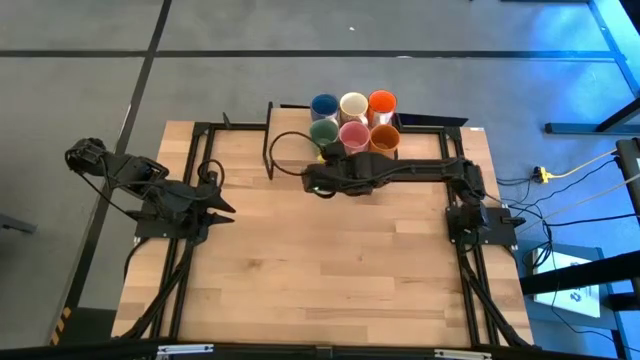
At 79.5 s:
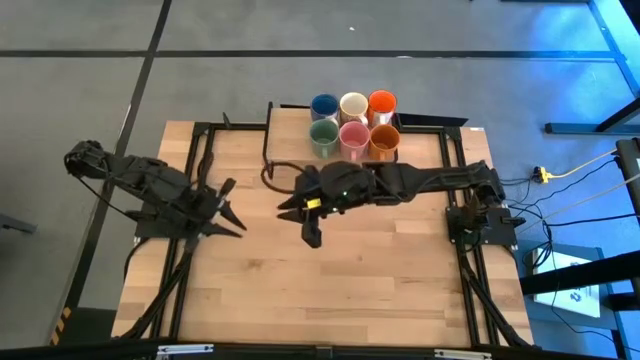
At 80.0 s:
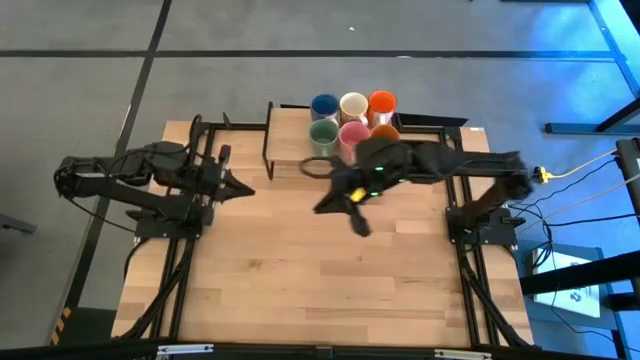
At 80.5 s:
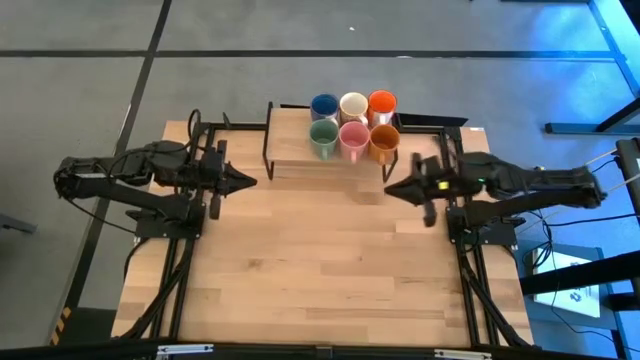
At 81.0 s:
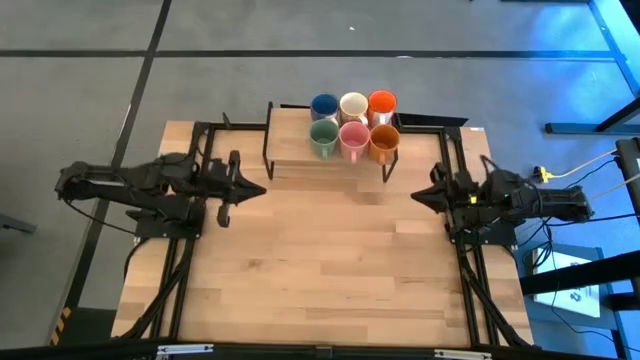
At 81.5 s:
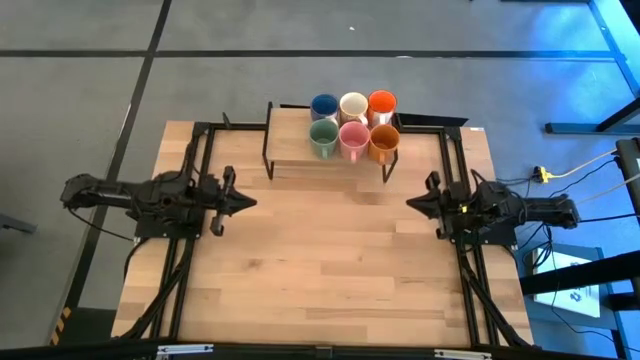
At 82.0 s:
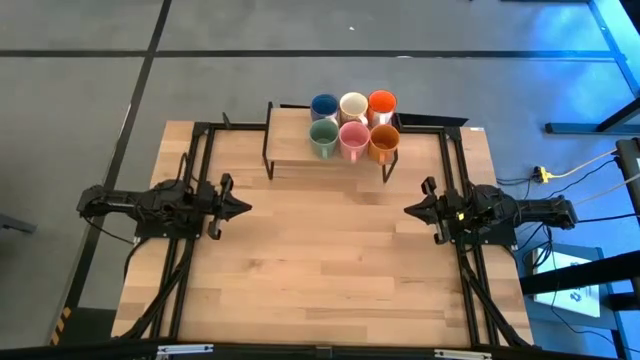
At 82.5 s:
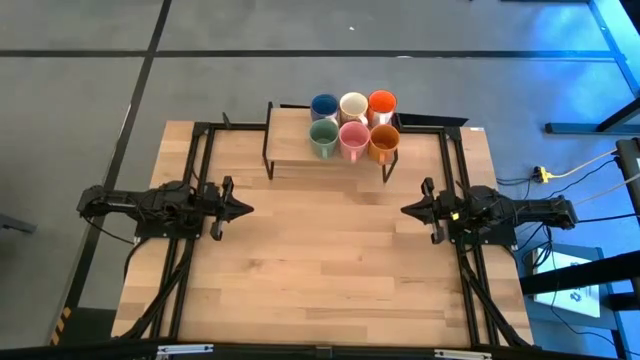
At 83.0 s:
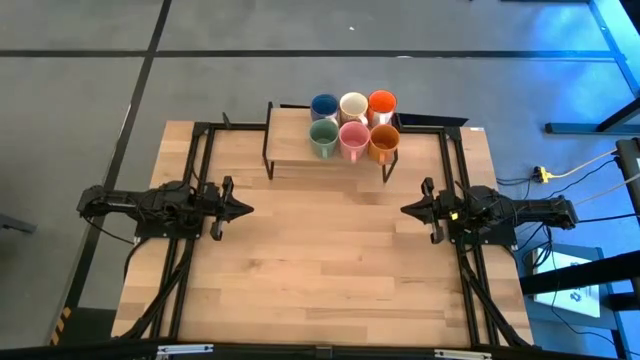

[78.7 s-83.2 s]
Task: Place coffee mugs
Return to Home Position

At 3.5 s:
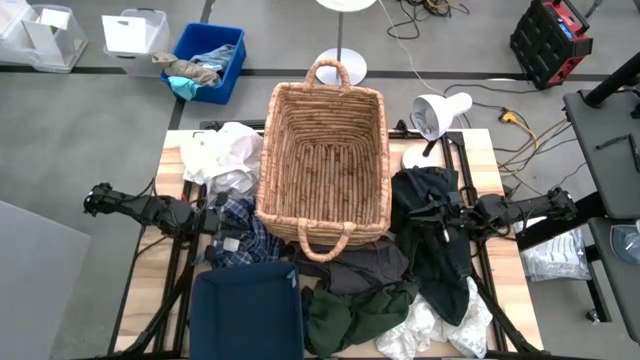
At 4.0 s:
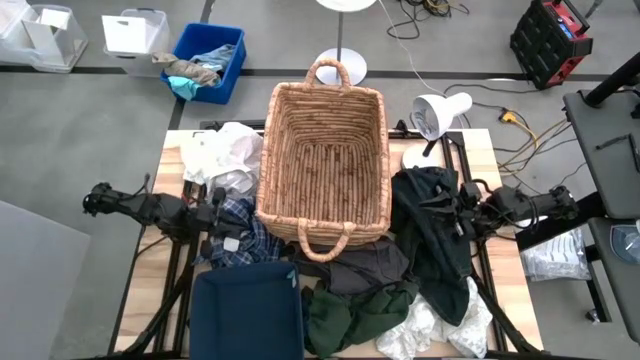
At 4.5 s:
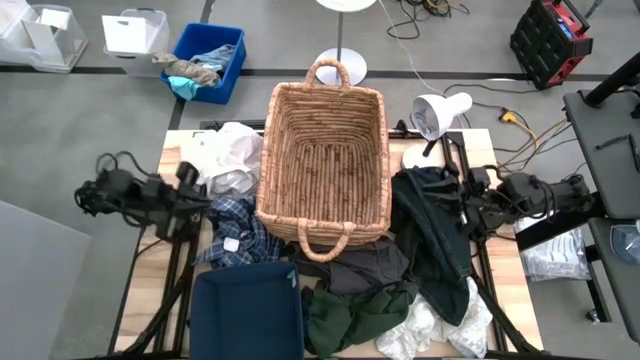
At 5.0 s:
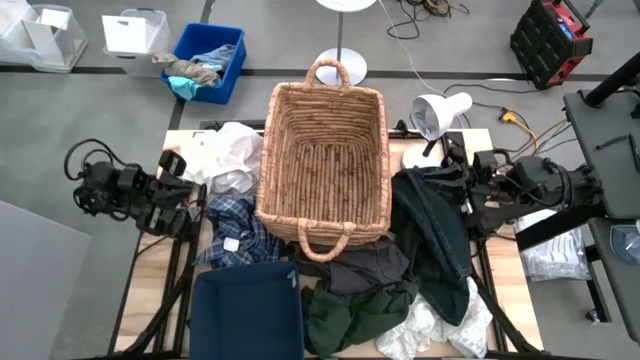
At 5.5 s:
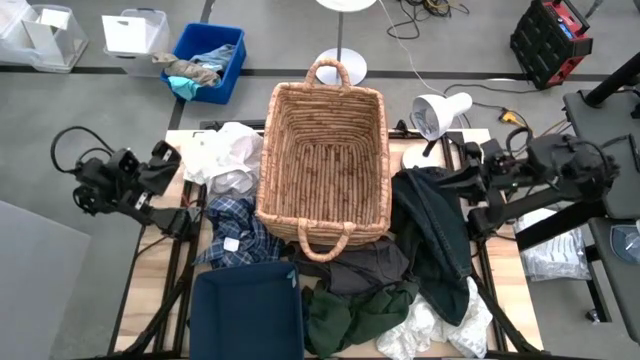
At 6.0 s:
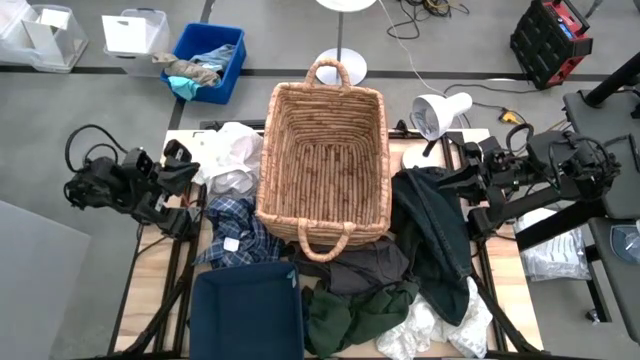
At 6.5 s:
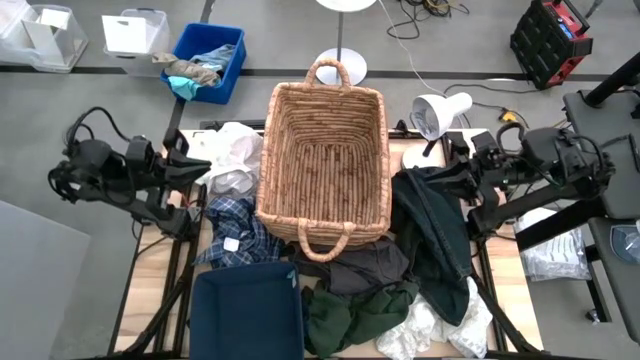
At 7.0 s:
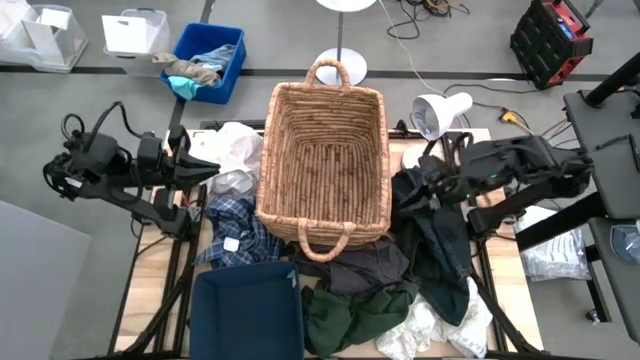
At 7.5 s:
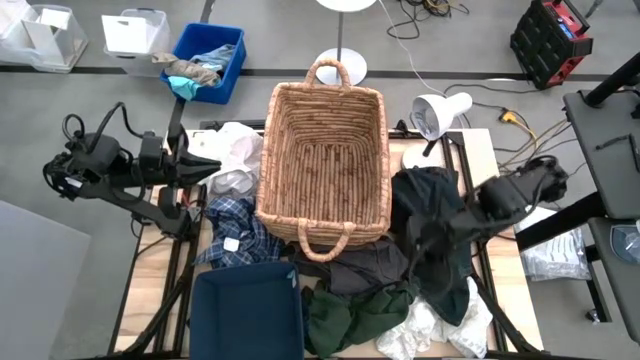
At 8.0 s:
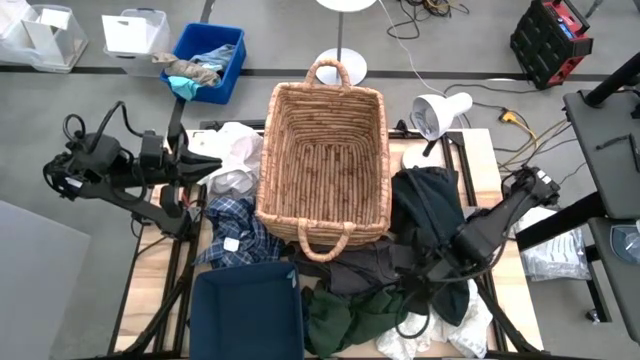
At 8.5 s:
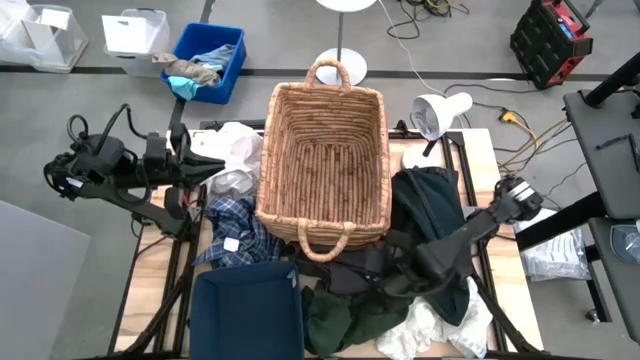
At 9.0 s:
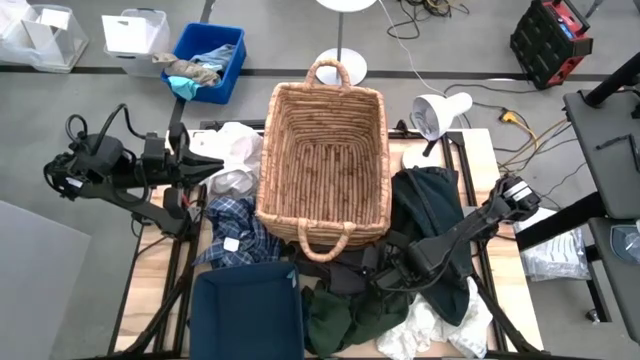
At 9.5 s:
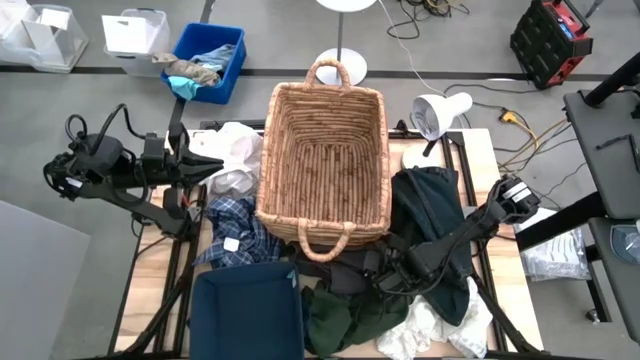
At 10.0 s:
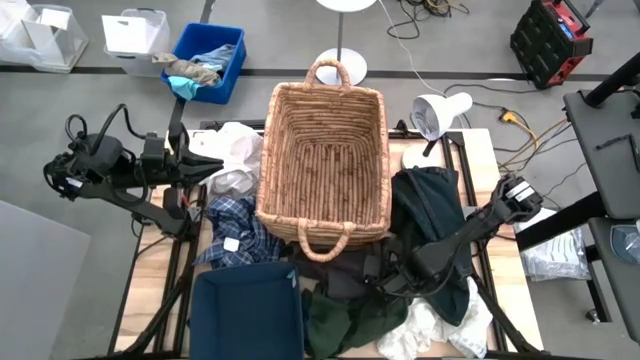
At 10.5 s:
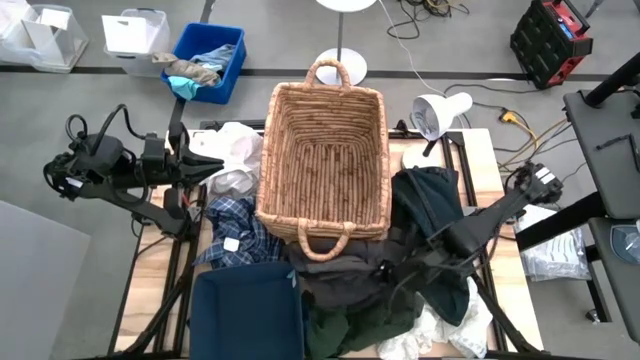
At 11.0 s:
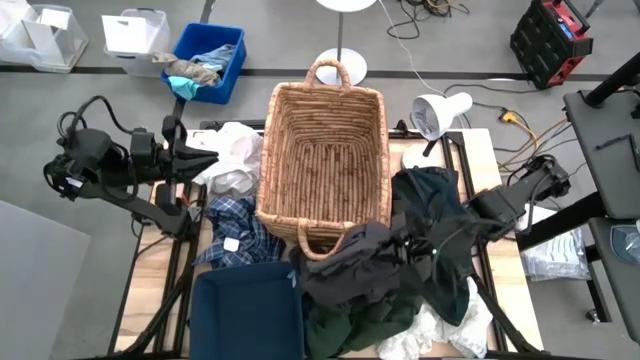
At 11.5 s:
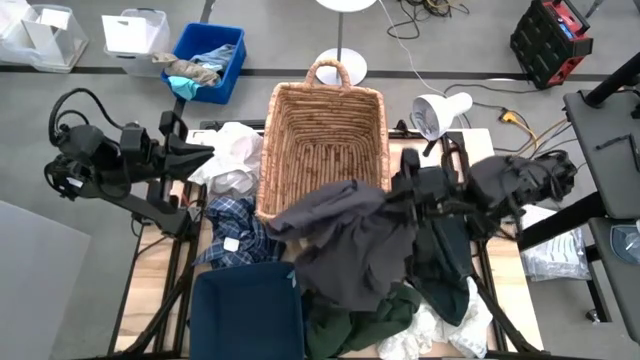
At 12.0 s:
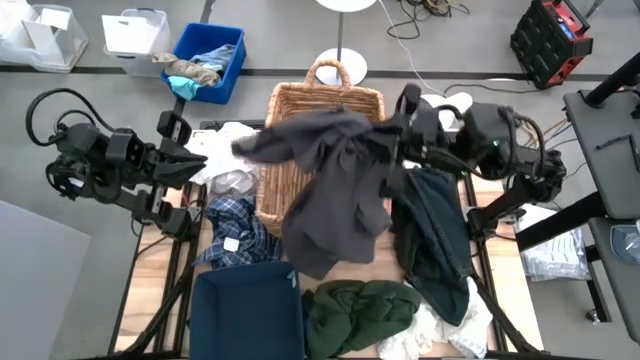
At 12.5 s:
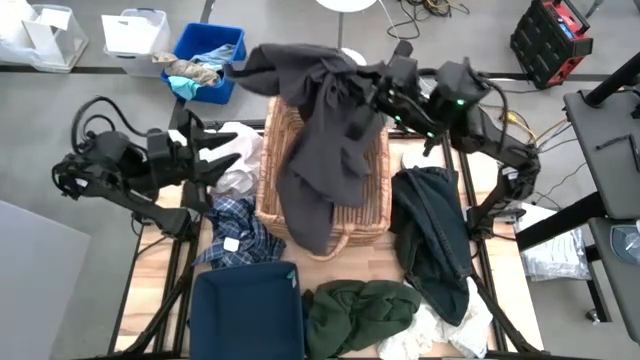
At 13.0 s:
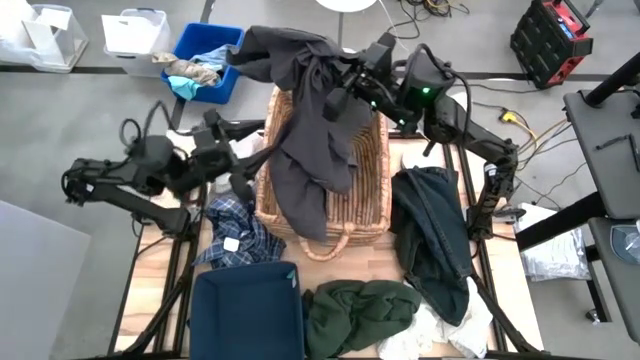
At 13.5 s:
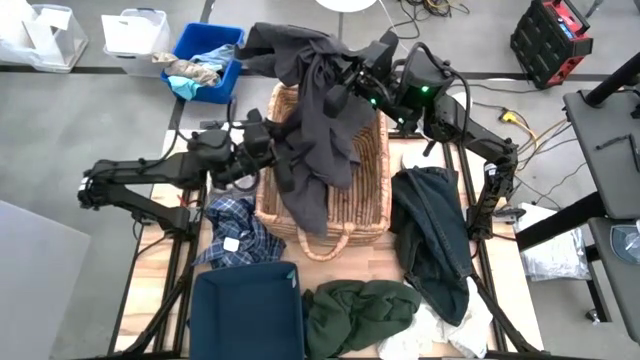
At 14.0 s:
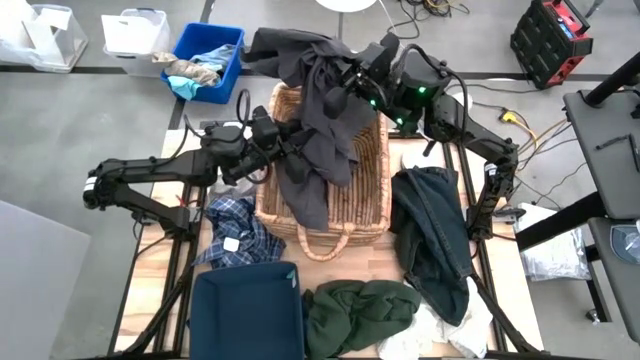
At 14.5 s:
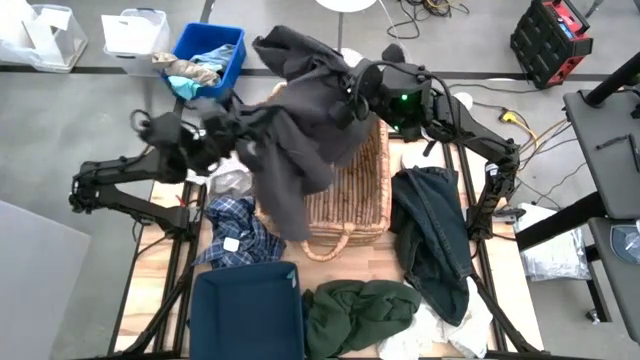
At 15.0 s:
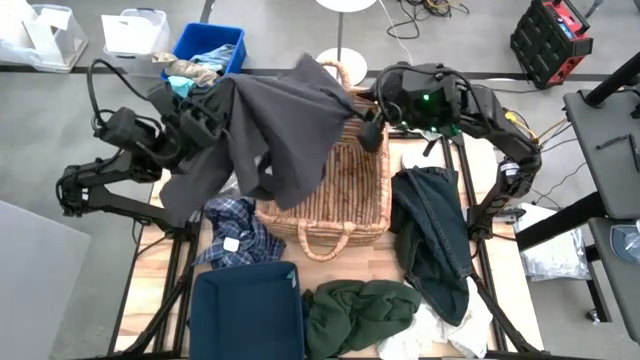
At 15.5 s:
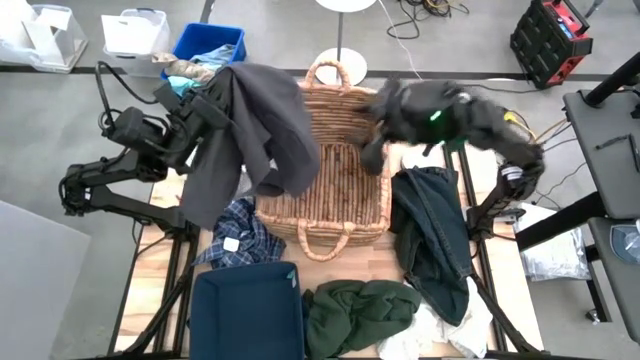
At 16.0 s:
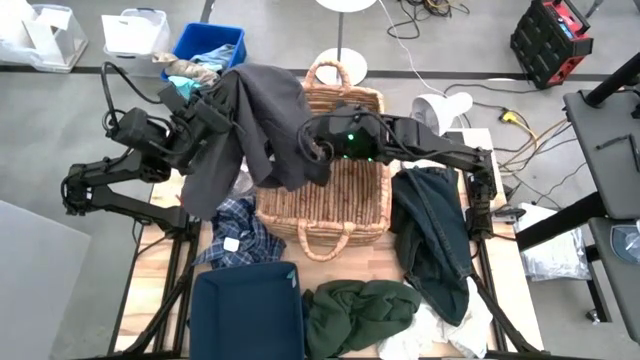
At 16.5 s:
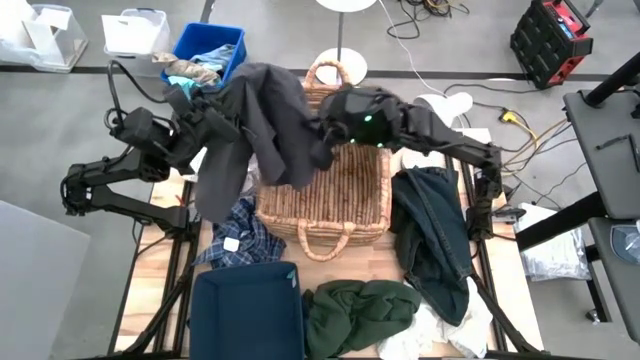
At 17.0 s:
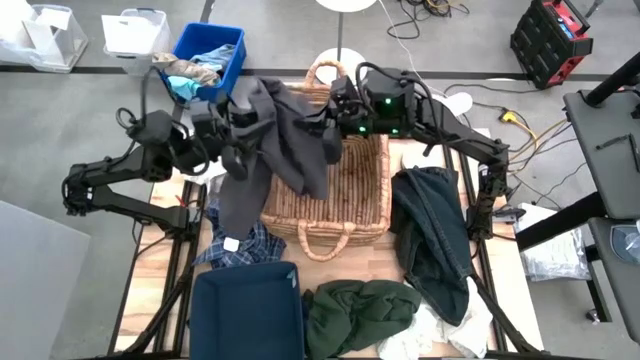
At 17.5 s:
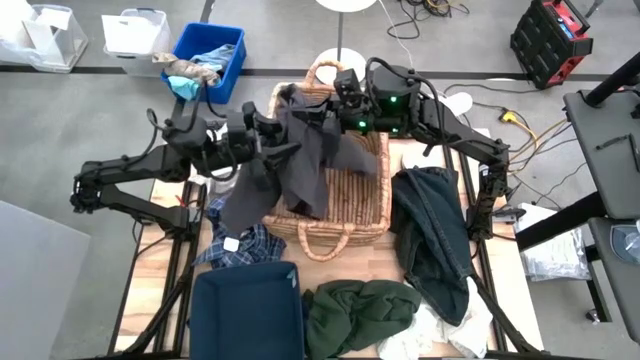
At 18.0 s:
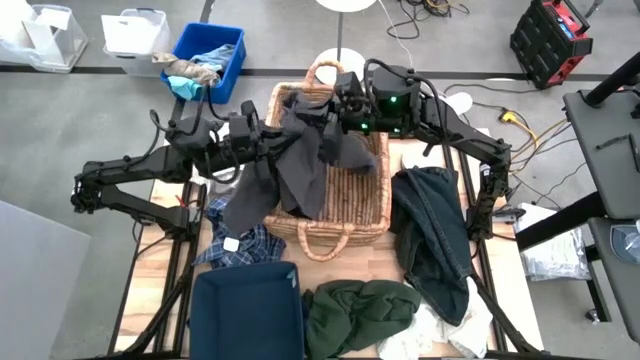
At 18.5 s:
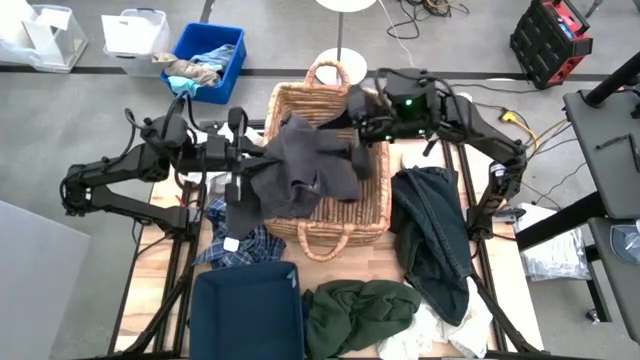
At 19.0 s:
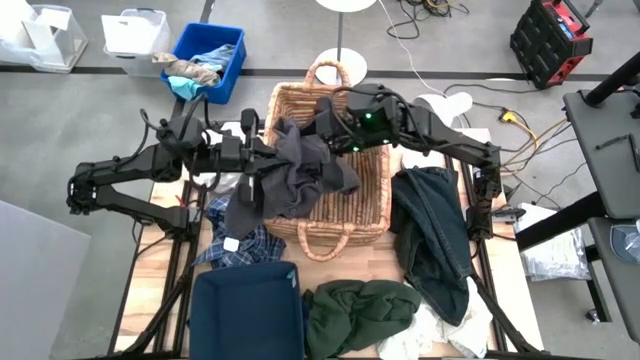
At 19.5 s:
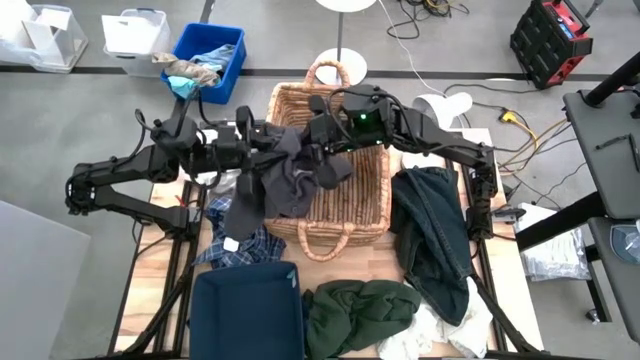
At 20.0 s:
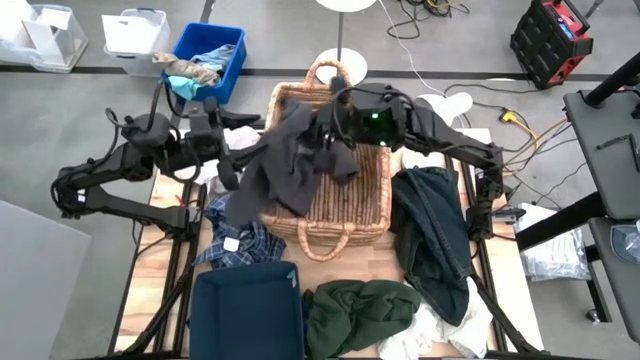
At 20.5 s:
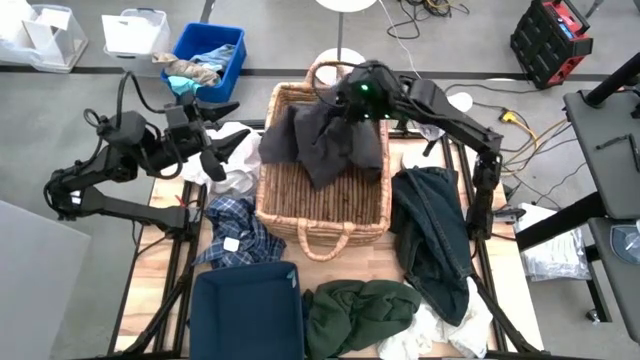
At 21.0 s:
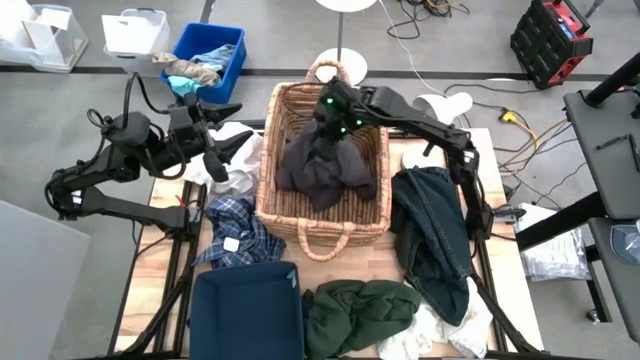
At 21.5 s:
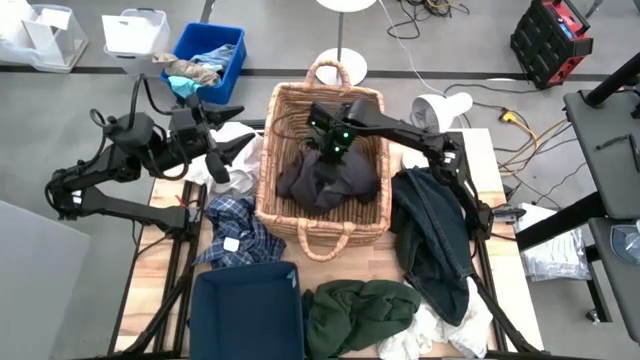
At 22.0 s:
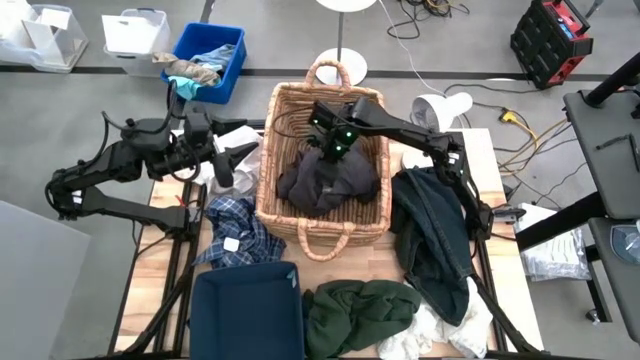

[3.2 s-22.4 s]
Task: Sort clothes
Put the grey pants into the brown basket
